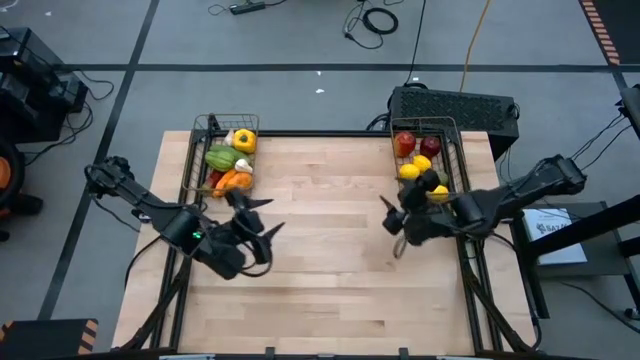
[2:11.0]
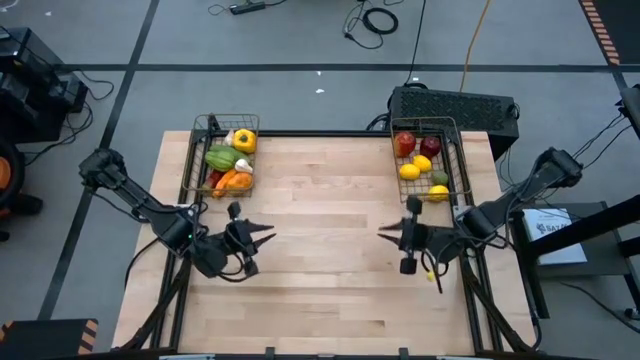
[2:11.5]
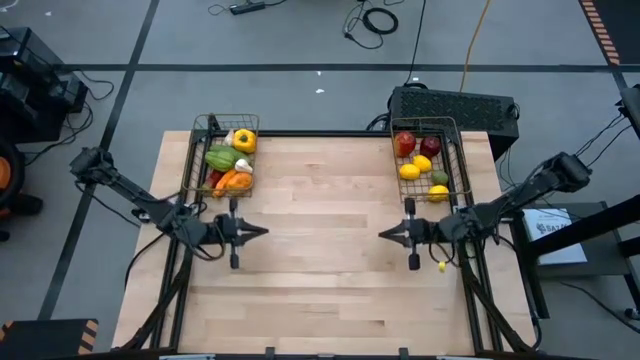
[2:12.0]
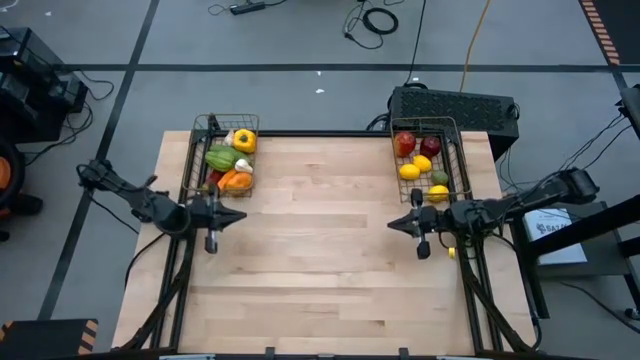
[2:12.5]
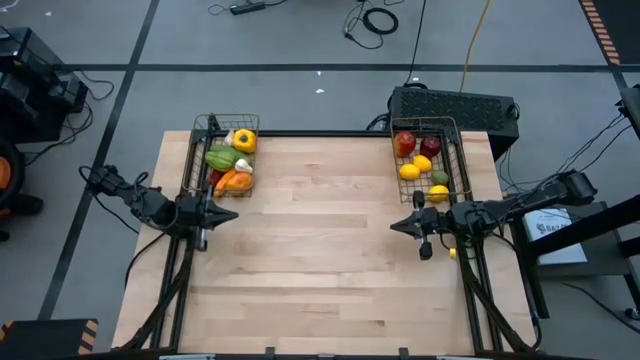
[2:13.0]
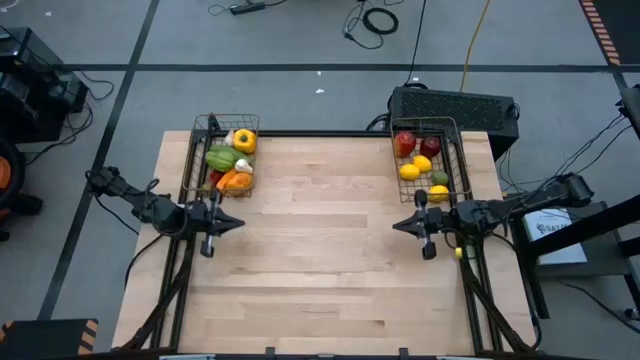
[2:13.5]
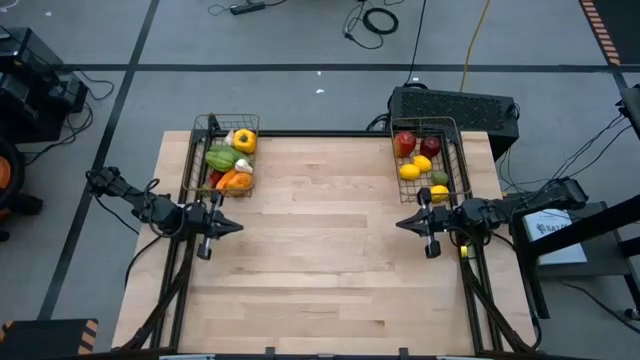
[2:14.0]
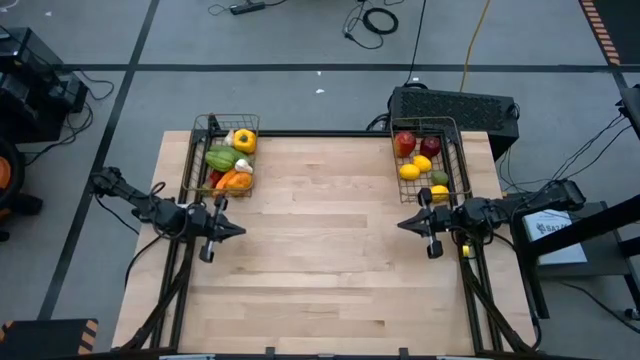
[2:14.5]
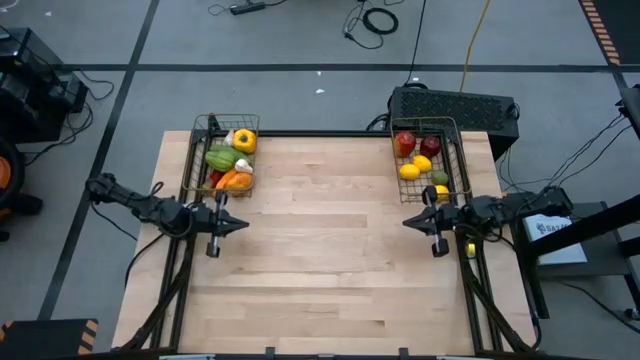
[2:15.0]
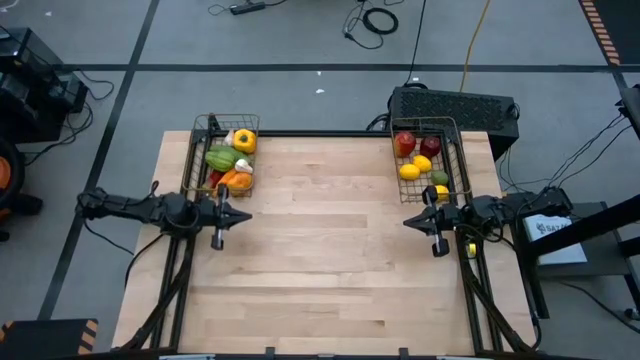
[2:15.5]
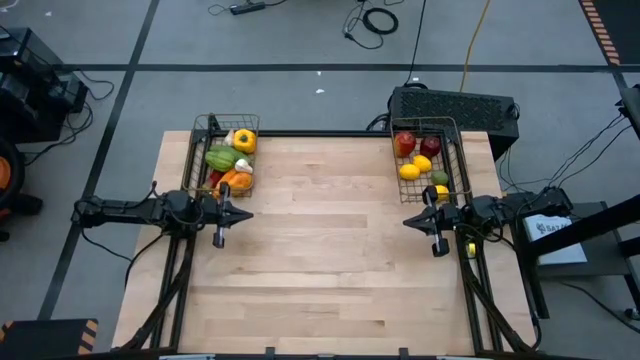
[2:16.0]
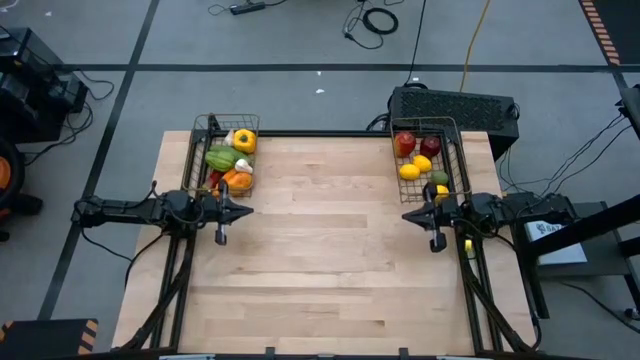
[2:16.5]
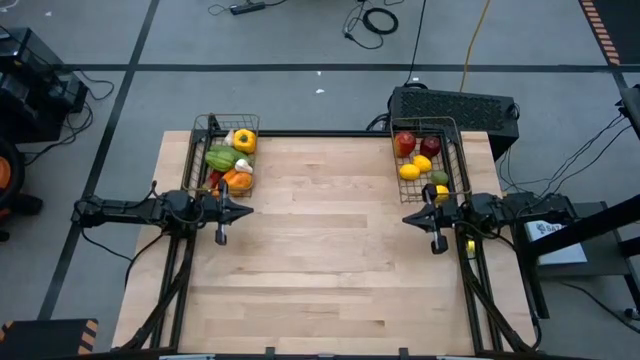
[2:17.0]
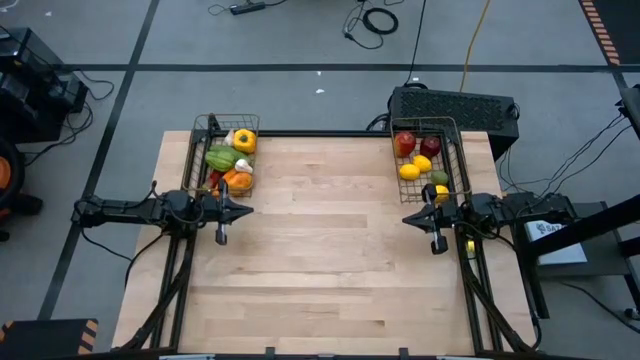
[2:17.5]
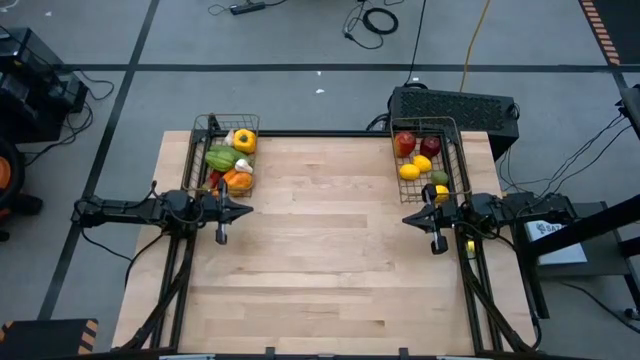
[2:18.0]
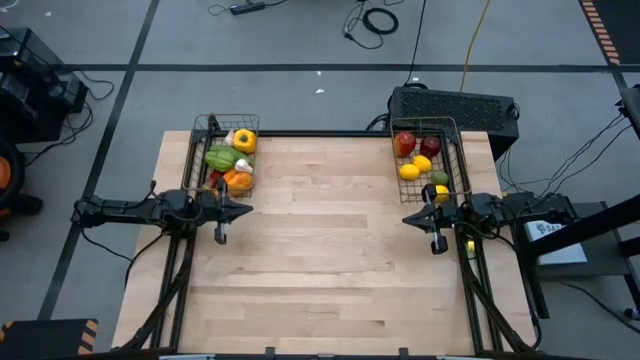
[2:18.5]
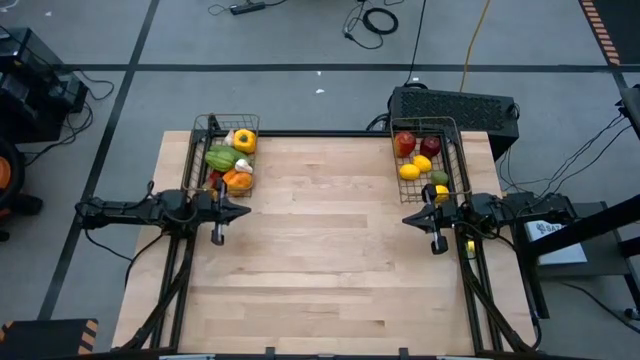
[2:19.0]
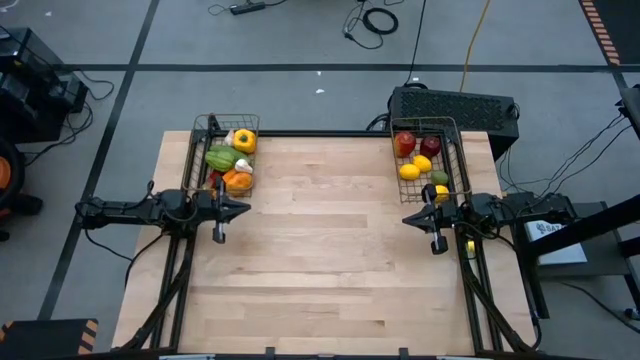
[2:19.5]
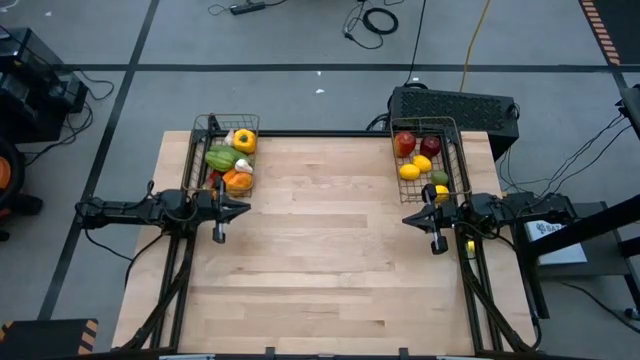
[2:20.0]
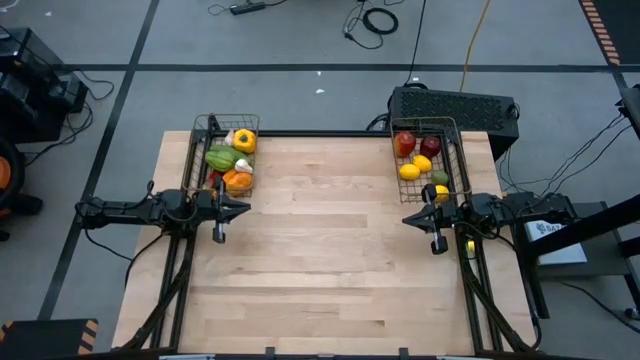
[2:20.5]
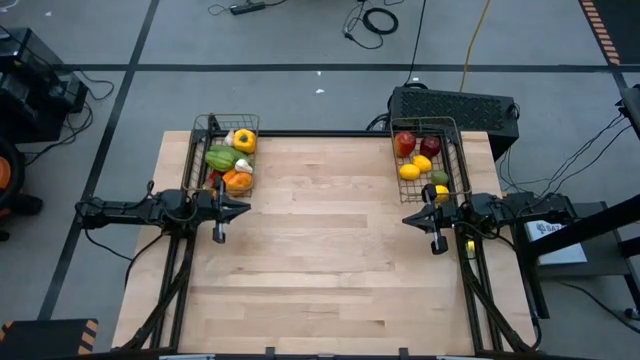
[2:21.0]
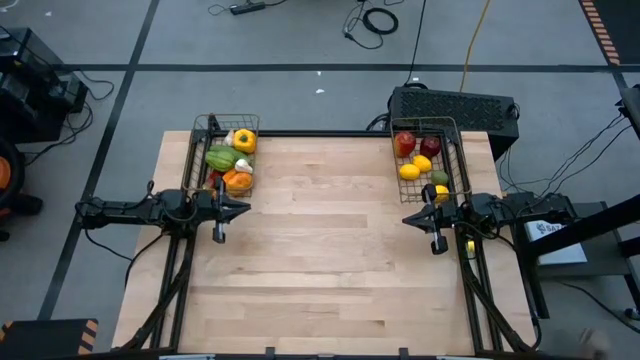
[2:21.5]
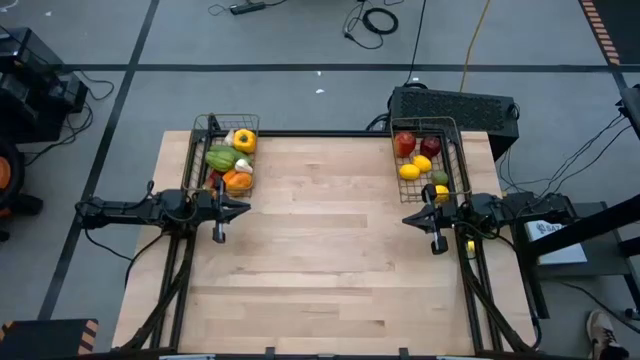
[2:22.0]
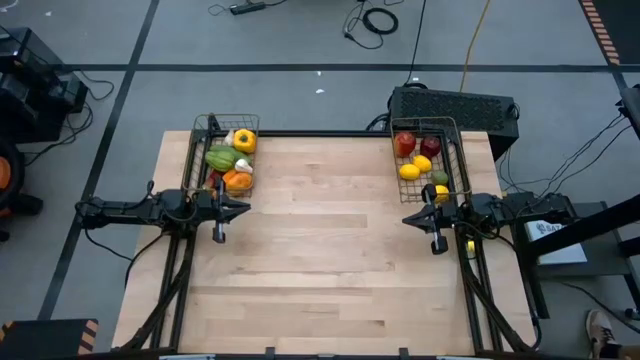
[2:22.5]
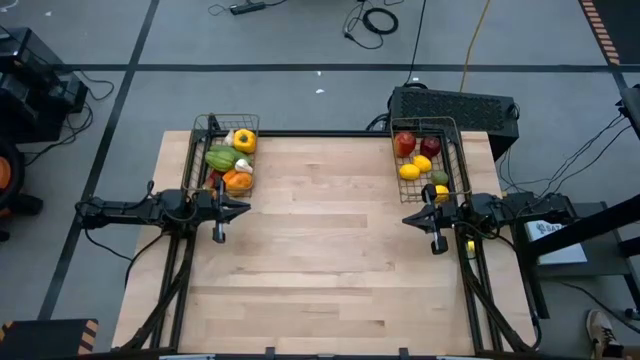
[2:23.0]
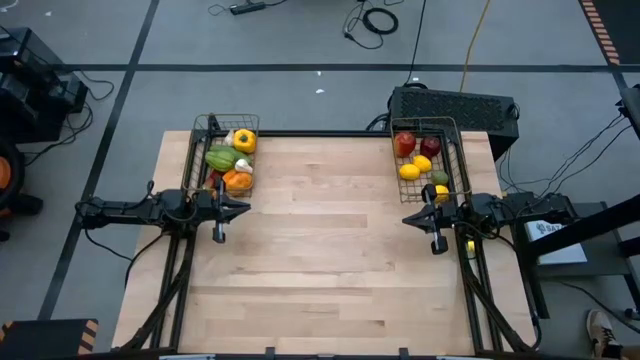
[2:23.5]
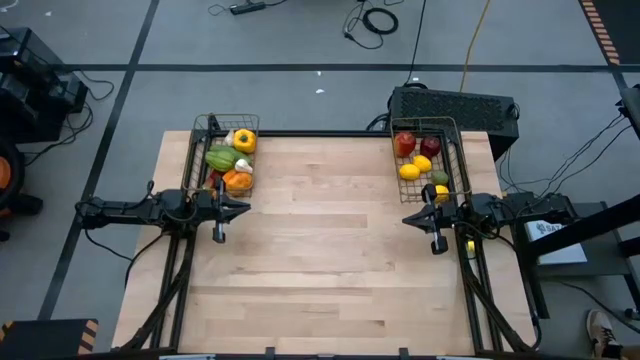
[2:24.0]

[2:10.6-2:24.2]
Task: Sort produce into baskets
Return to Home Position

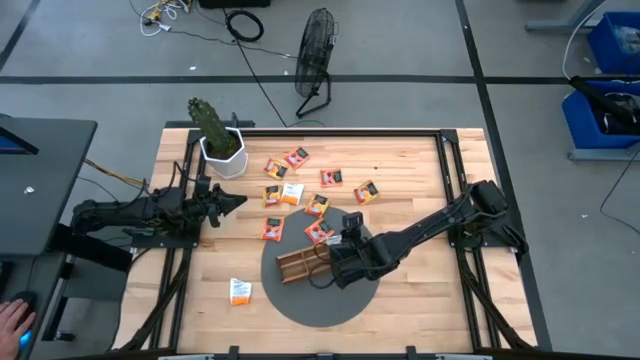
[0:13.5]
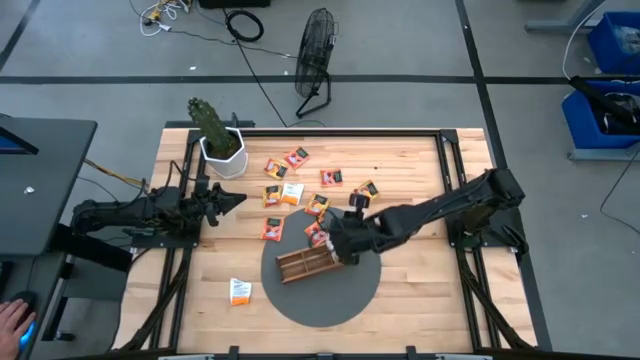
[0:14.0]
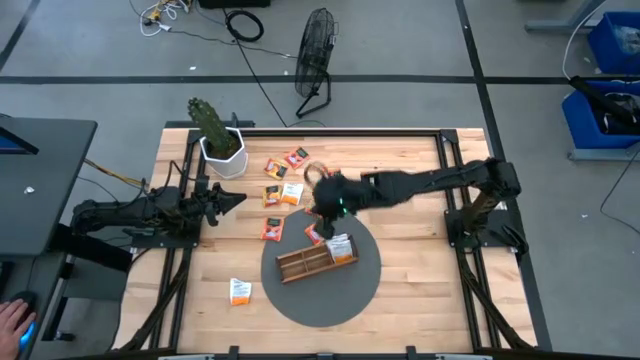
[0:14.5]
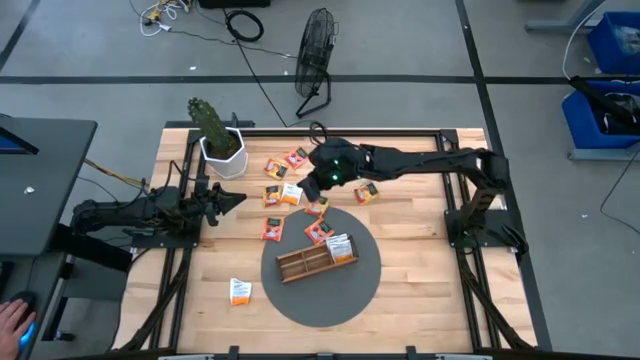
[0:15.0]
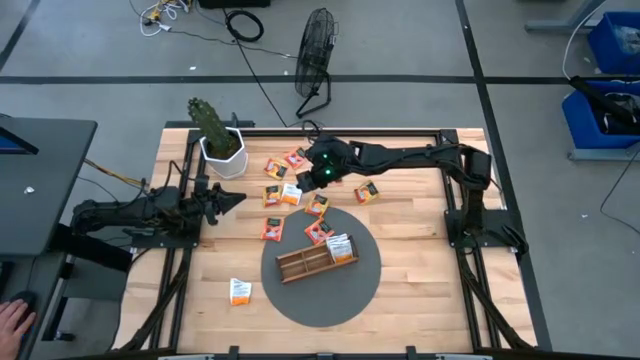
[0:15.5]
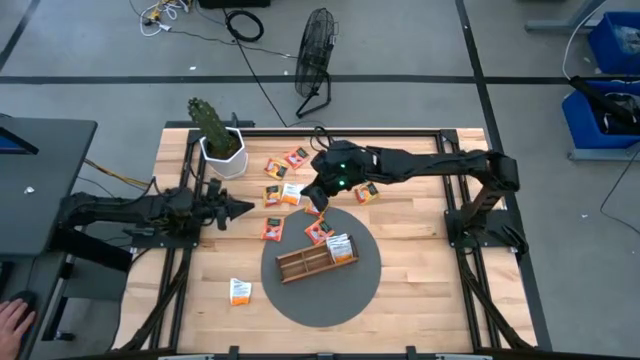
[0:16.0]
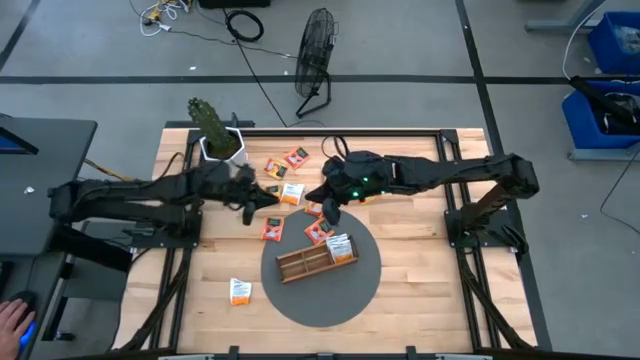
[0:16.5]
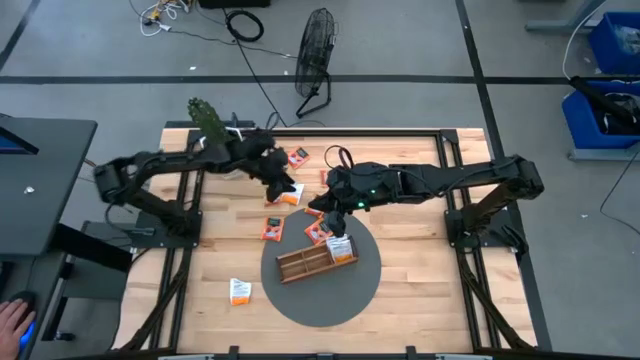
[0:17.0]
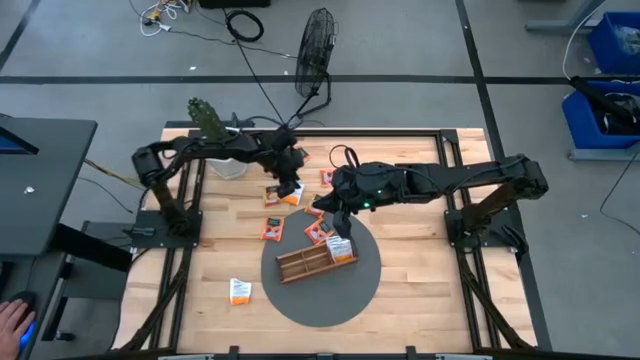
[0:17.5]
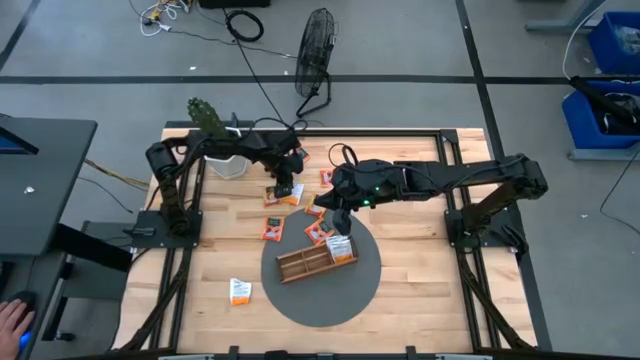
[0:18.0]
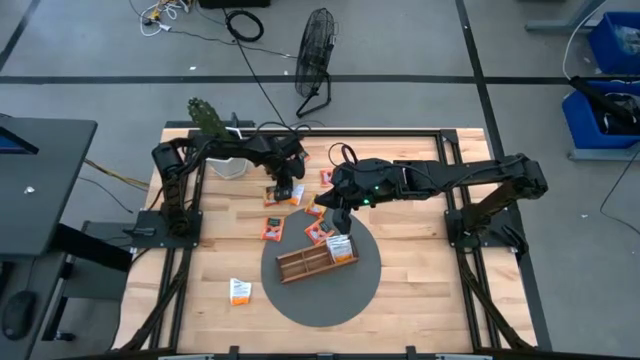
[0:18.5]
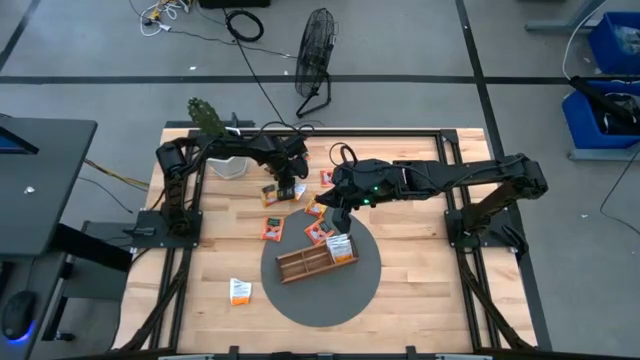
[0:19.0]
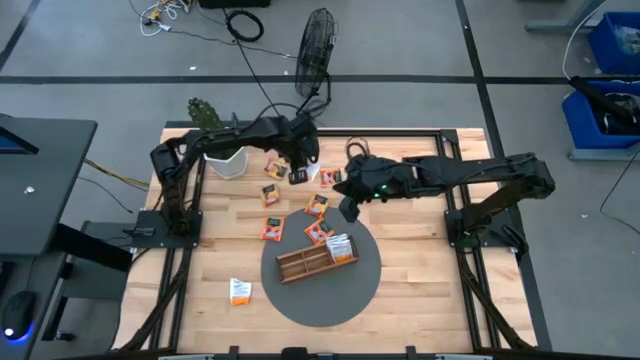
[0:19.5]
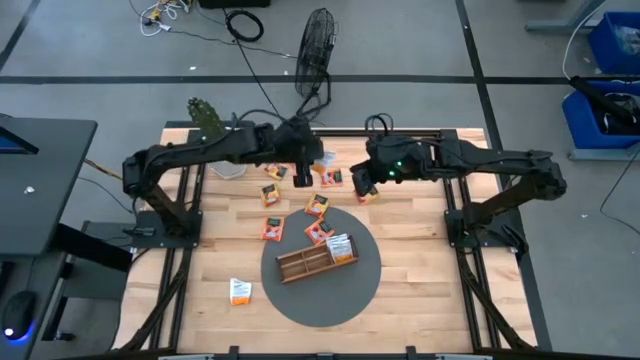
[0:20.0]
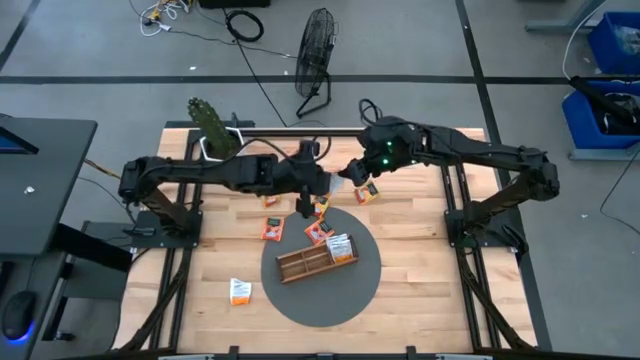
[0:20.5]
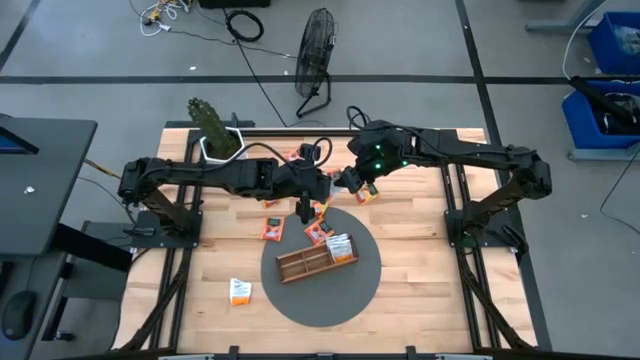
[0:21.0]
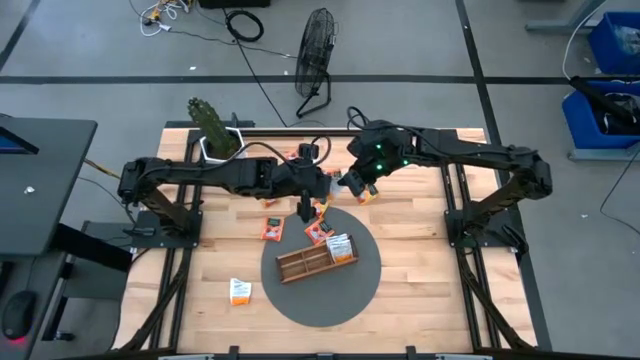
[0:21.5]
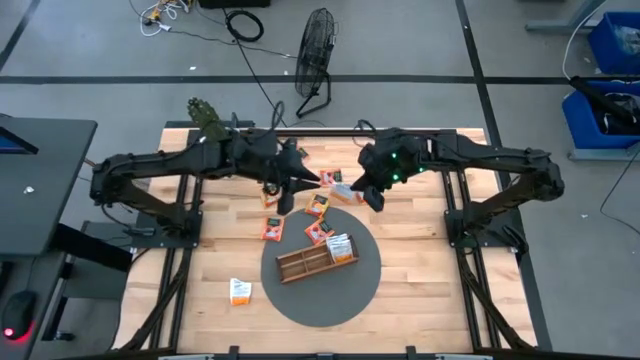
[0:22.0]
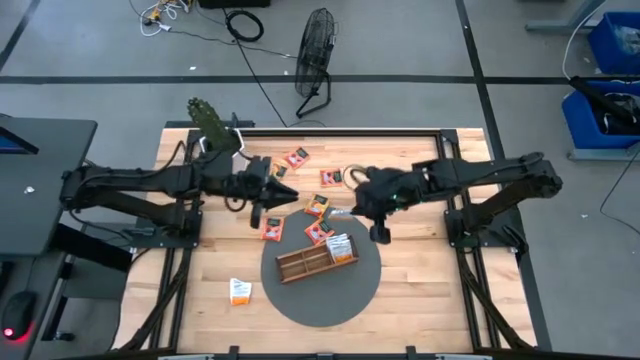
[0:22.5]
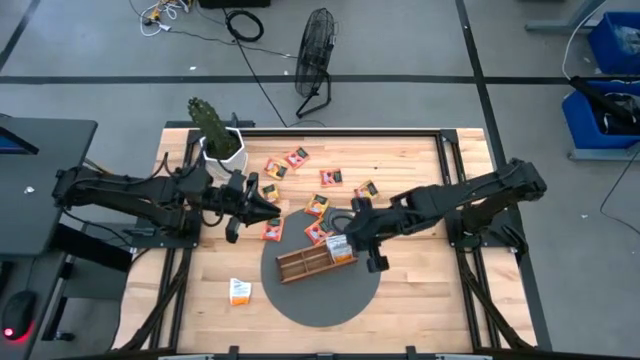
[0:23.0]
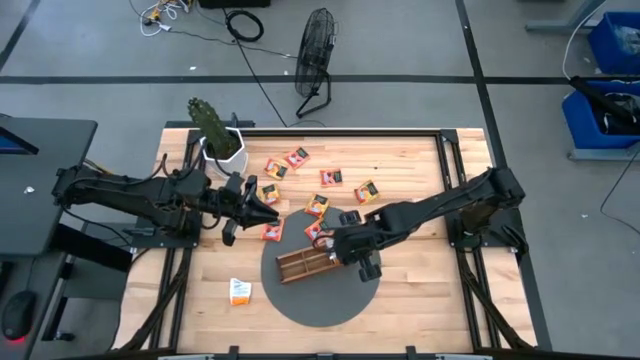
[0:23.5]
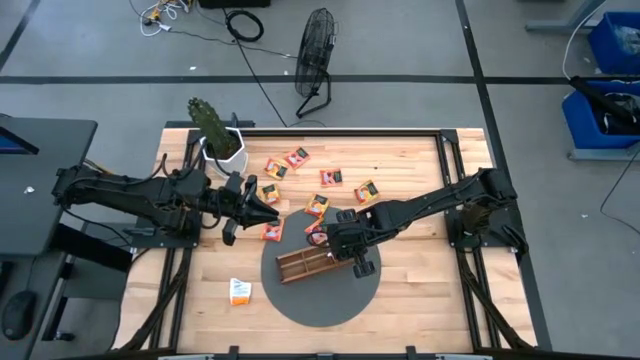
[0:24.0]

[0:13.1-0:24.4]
Task: Pick & Place Tea
Put the top white tea bag into the right section of the wooden organizer
